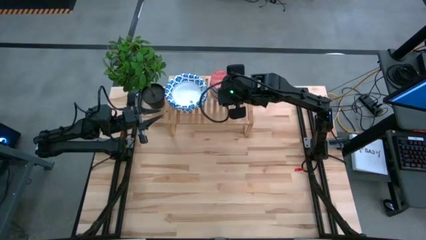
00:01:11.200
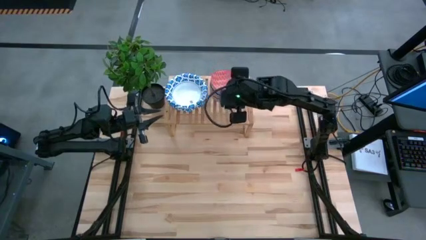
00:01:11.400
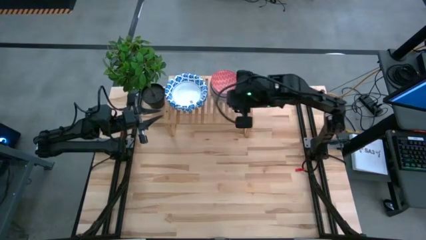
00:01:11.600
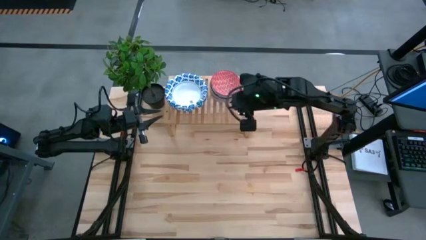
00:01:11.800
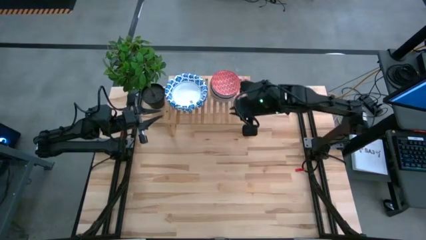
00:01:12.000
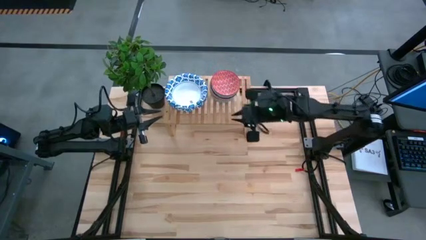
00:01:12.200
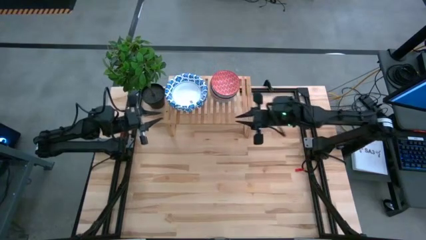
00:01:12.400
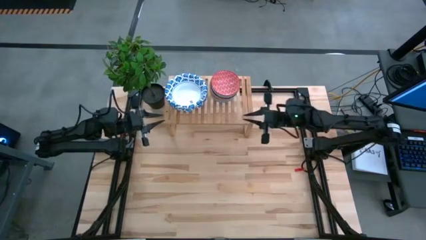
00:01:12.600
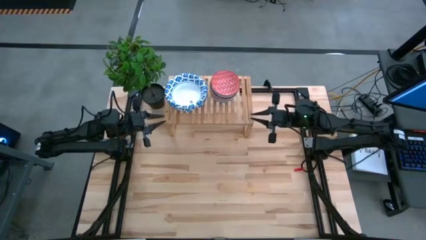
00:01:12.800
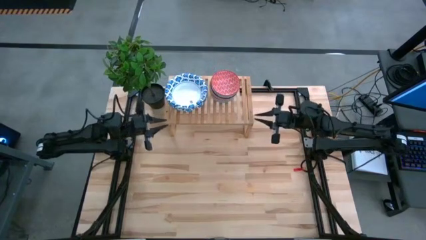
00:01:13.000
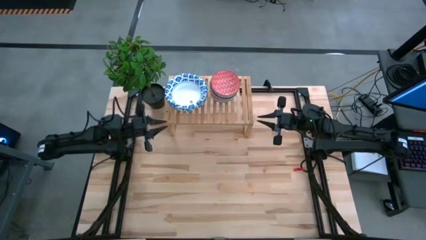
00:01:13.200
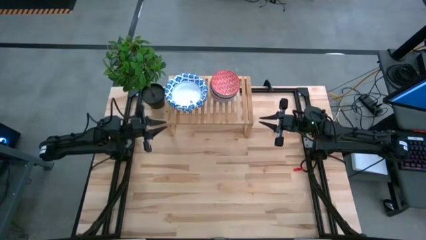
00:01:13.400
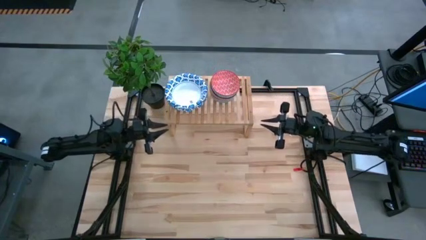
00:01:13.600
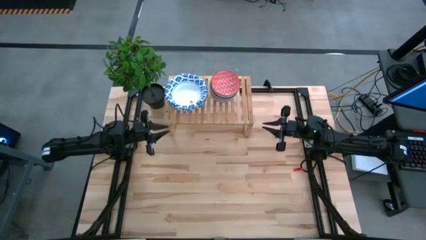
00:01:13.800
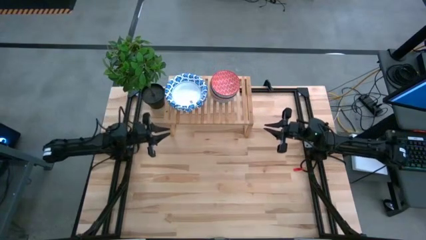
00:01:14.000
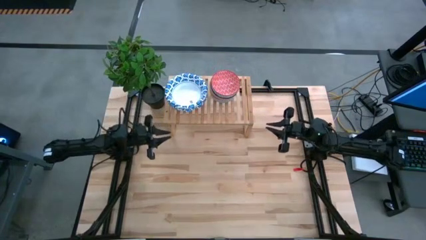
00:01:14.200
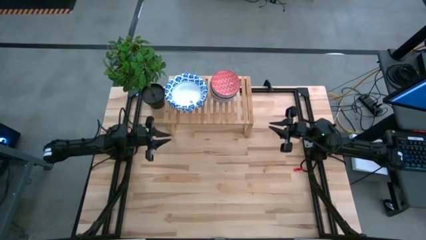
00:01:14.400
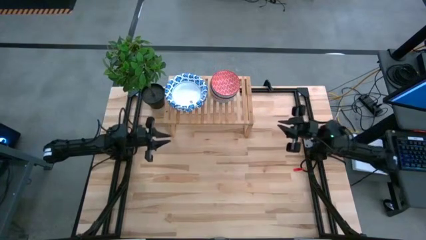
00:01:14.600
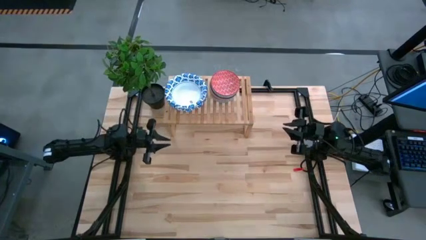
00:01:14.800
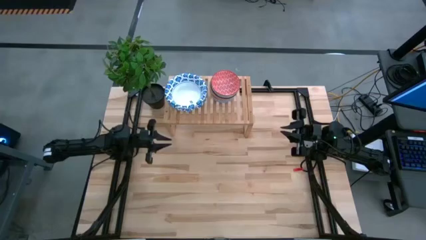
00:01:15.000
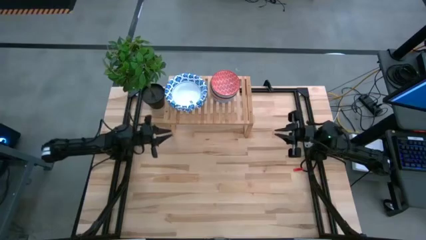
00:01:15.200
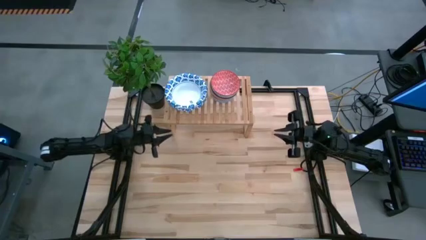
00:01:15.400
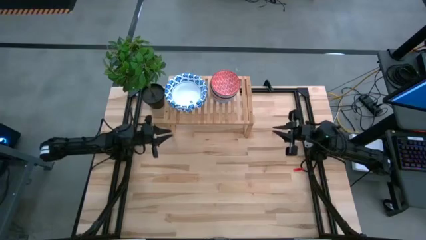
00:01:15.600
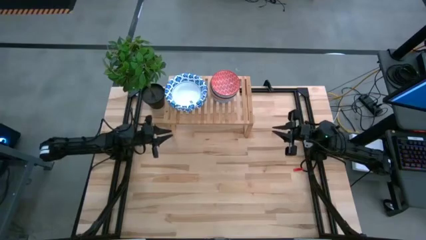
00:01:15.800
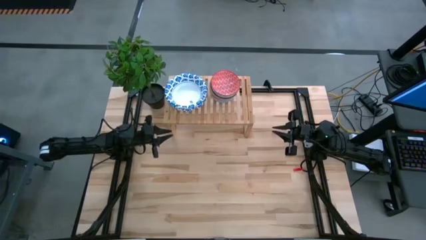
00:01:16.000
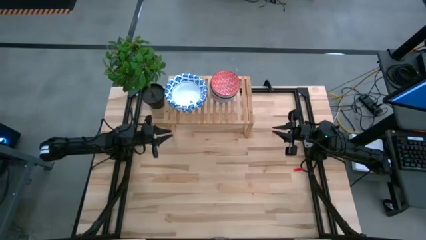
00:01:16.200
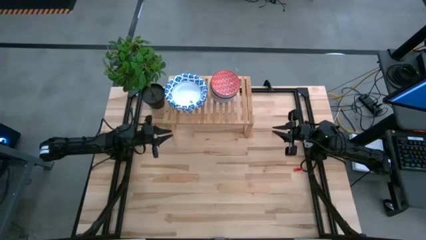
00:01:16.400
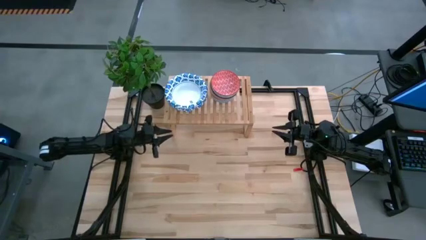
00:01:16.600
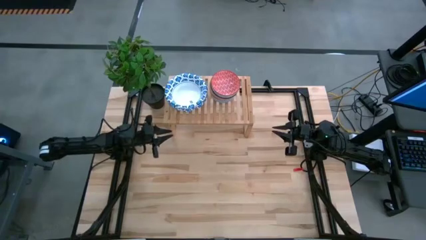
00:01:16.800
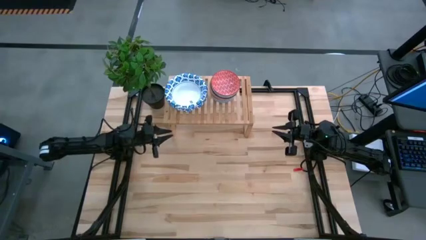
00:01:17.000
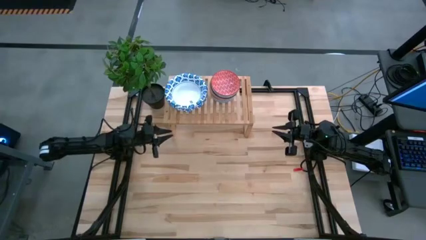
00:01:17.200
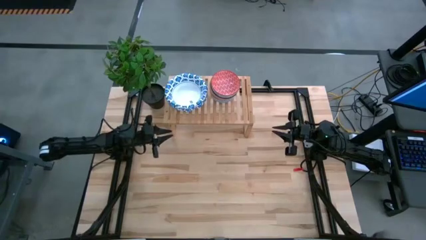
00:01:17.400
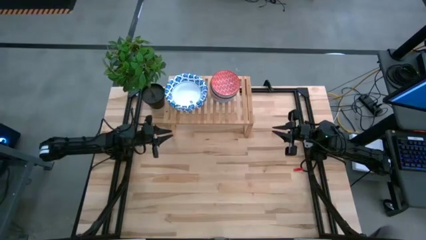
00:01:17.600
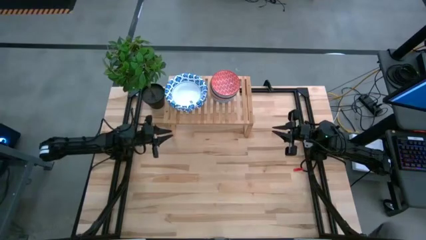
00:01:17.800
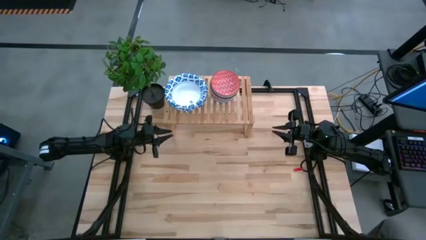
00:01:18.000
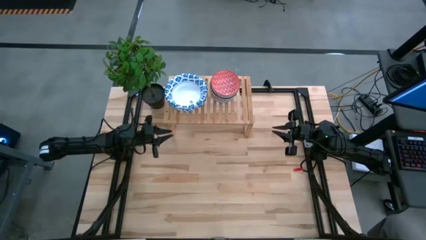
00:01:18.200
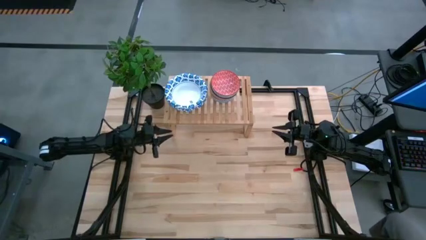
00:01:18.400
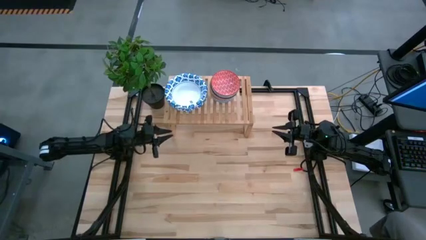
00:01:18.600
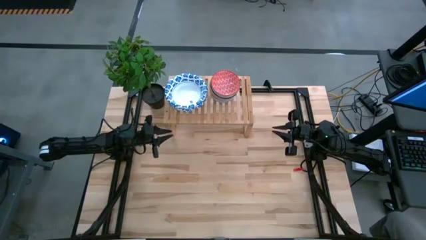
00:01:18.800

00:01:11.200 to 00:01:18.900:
Task: Place and stack bowls onto a shelf
Return to Home Position

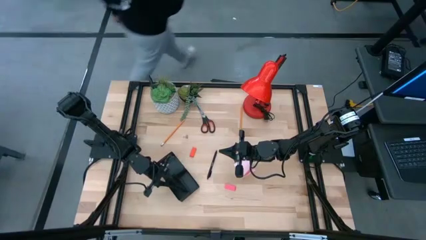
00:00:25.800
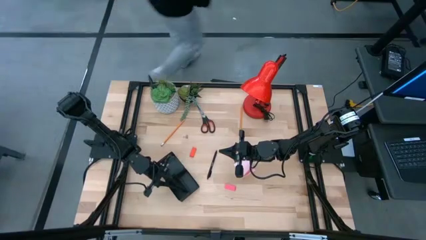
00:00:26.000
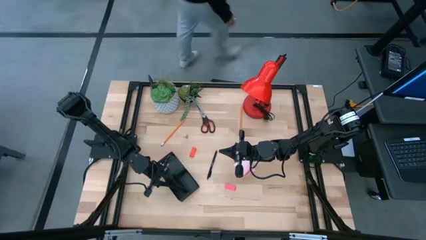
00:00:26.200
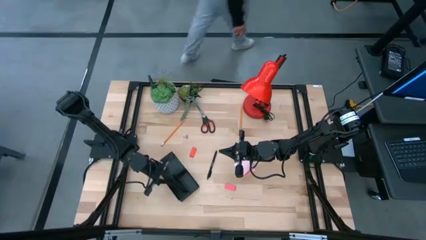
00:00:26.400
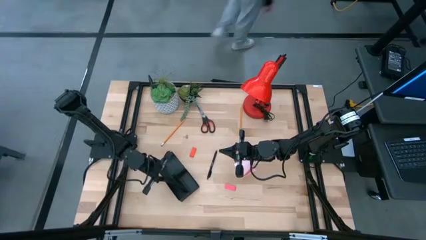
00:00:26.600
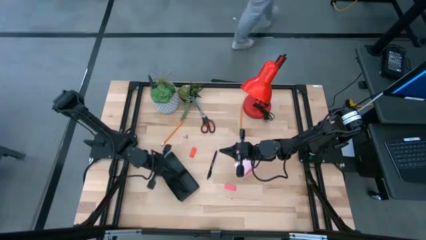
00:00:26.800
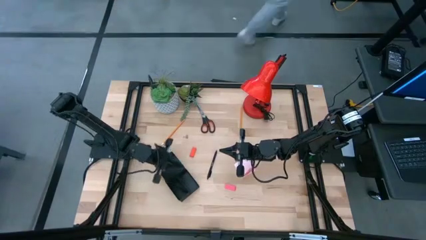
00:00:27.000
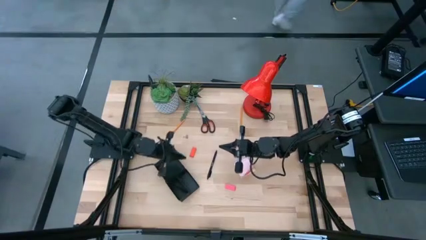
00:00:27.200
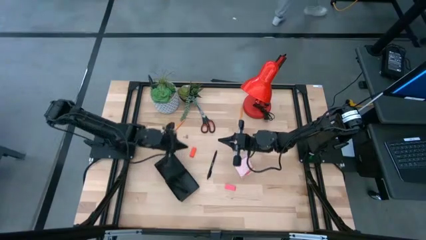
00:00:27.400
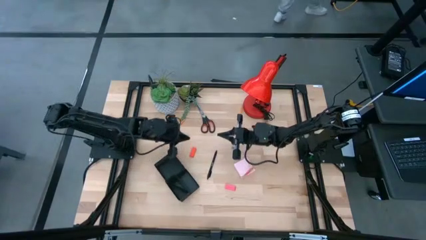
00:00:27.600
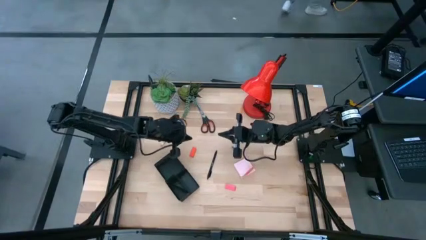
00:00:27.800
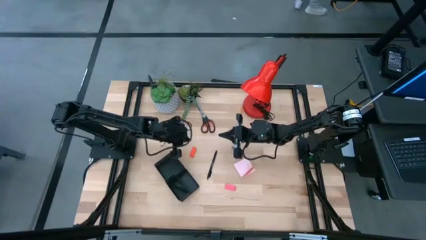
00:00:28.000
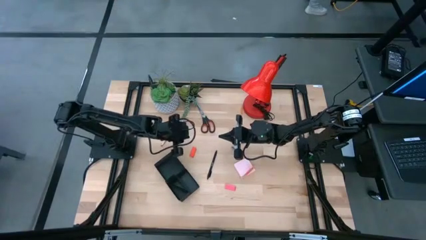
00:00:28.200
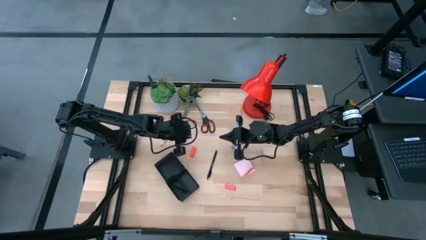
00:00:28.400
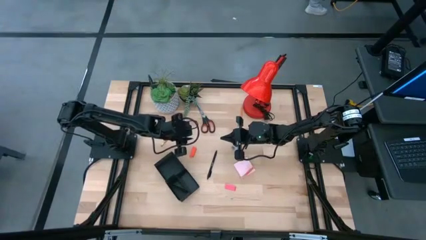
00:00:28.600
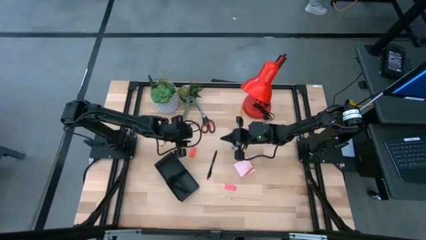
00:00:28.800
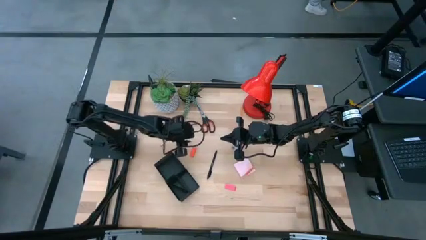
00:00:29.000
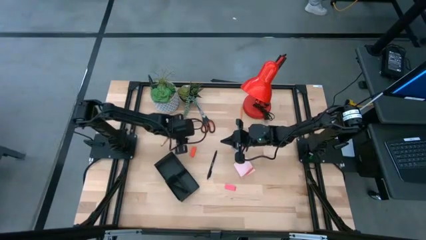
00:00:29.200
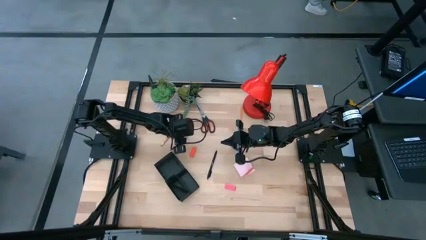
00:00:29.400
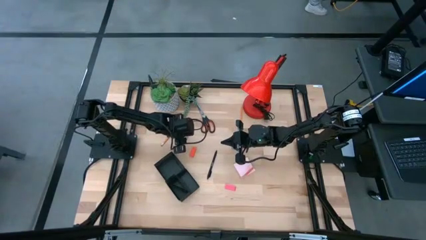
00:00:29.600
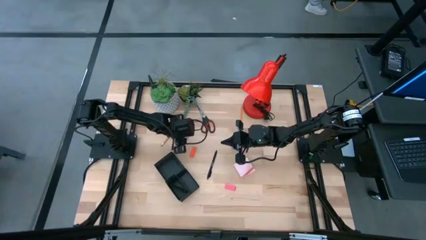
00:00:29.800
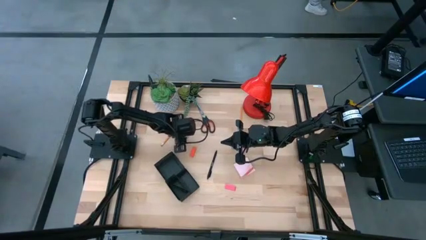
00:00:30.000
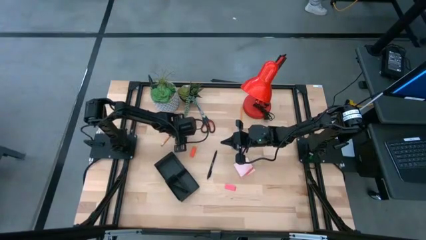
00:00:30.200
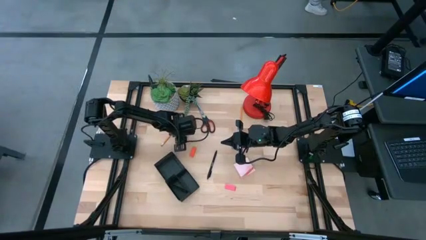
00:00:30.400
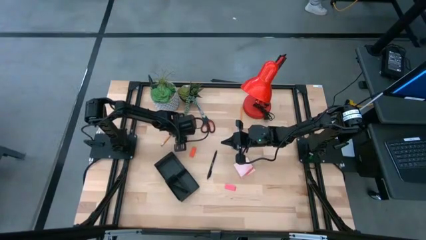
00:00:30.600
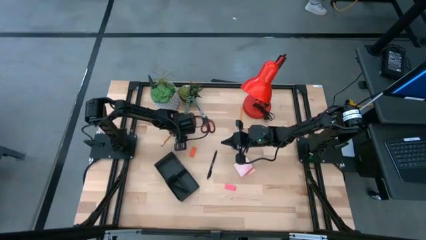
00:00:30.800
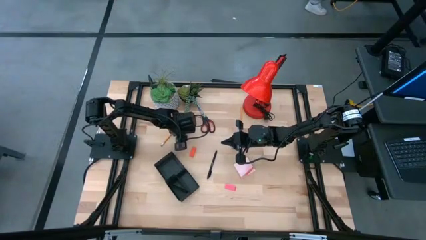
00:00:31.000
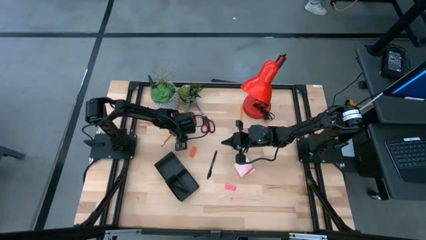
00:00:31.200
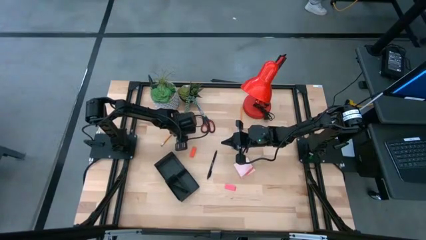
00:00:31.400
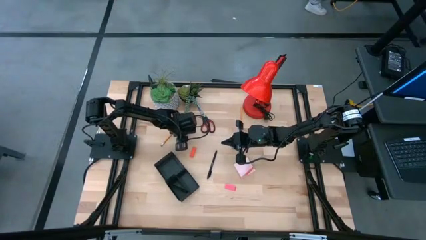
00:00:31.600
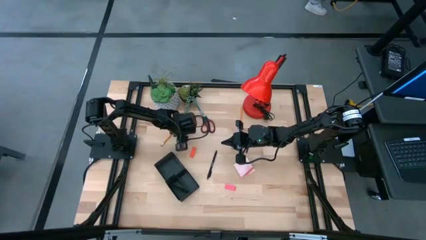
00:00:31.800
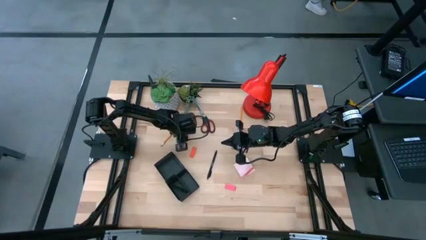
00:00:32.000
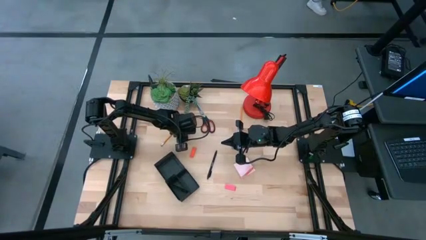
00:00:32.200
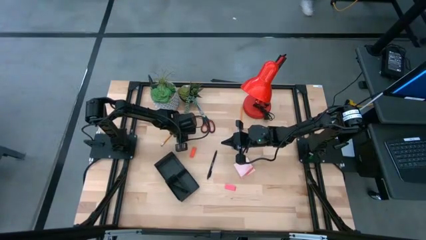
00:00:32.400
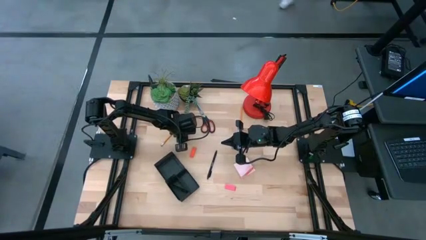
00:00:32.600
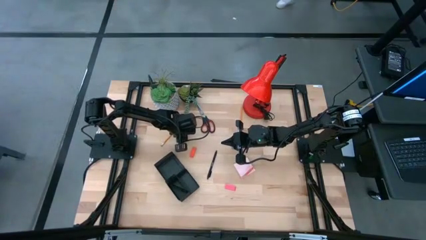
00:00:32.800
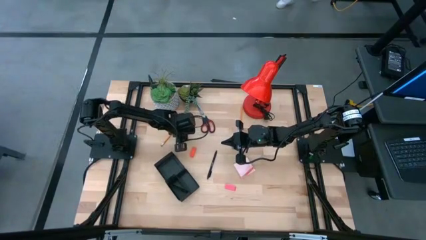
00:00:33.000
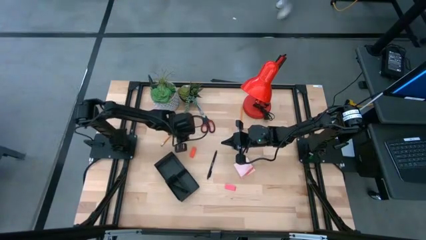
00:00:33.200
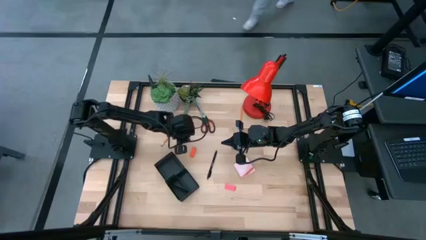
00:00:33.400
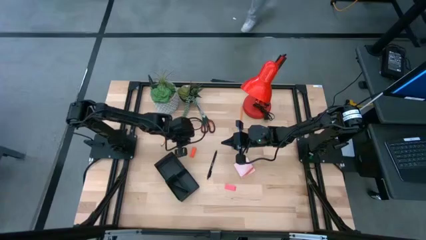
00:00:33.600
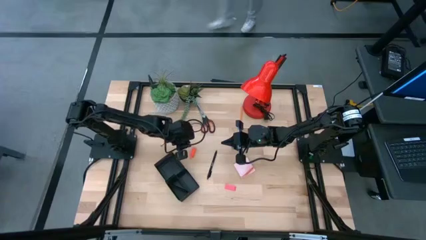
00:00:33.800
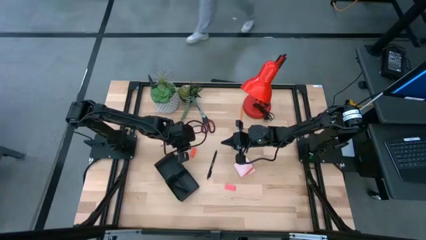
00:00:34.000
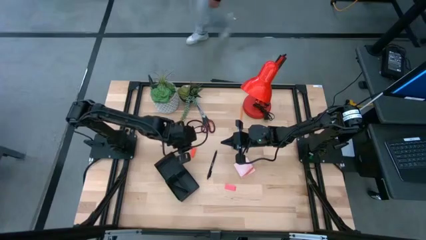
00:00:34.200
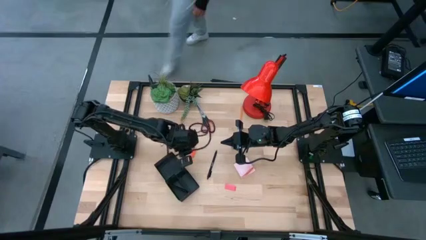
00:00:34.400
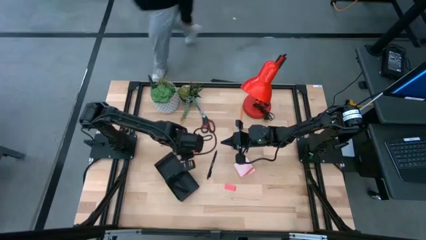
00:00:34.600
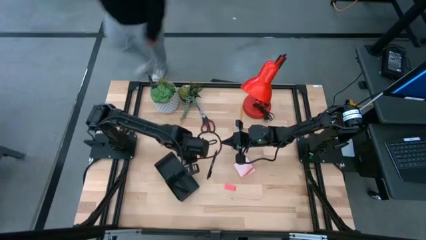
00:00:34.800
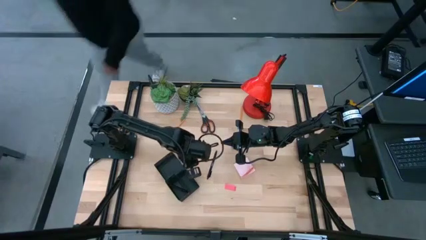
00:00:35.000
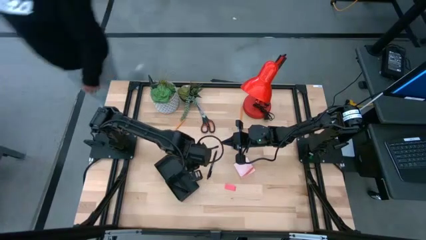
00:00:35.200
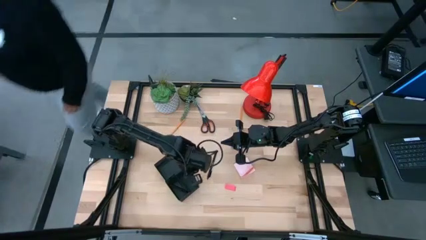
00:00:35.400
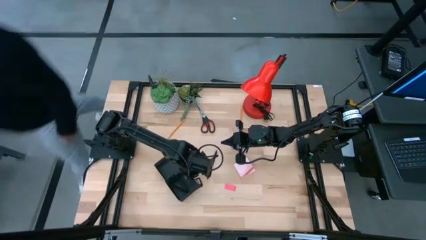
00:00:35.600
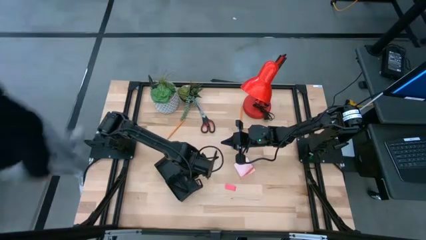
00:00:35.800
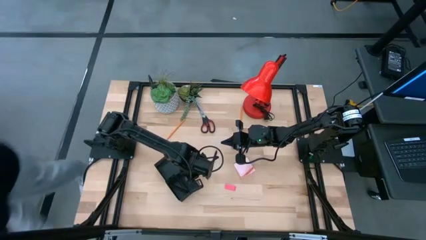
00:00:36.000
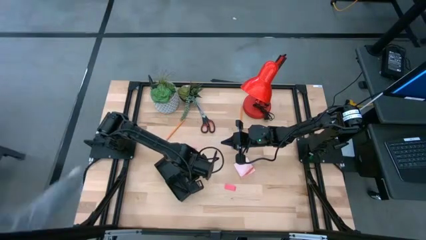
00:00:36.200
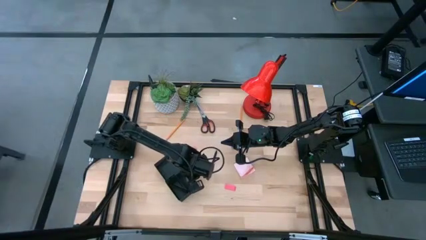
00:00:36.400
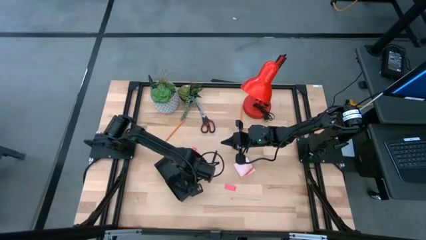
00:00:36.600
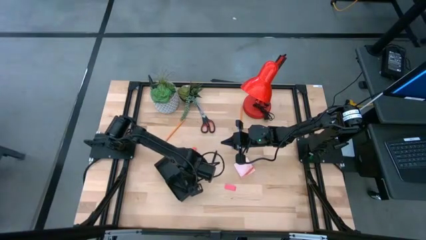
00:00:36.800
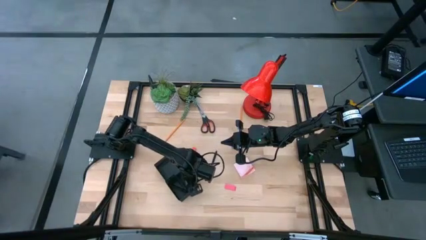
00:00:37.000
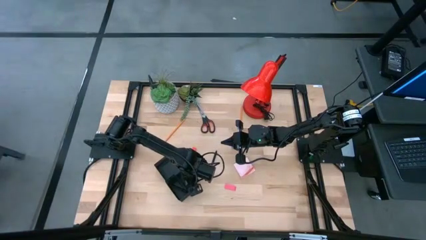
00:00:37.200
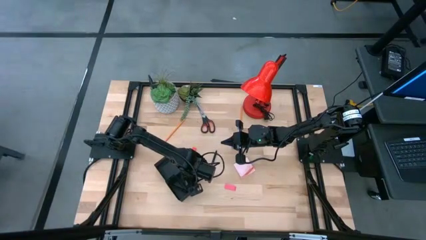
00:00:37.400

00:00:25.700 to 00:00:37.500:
Task: Pick and place office supplies into organizer
Put the pink binder clip into the black desk organizer
